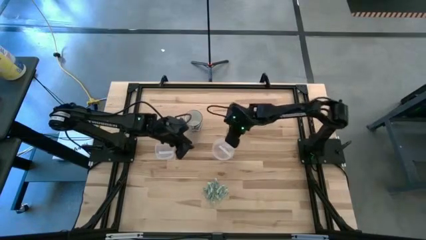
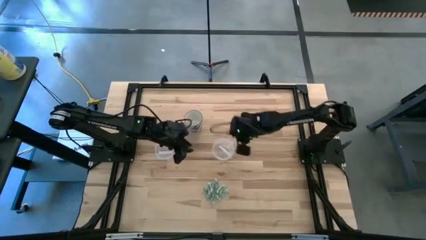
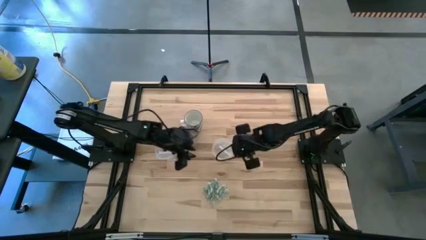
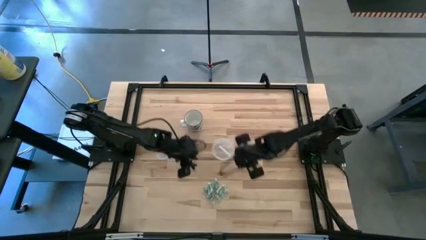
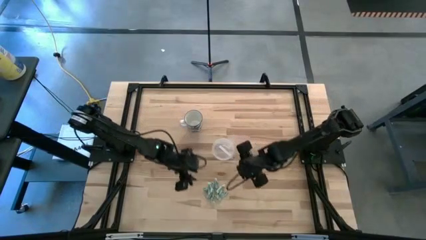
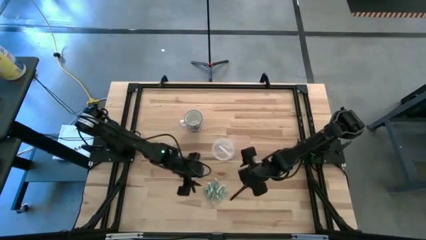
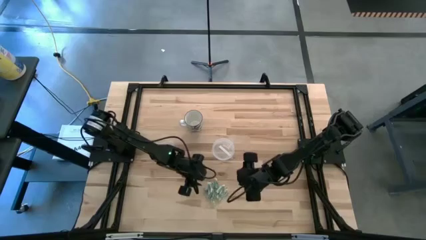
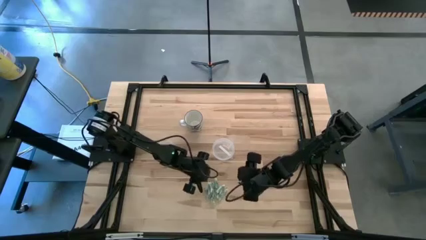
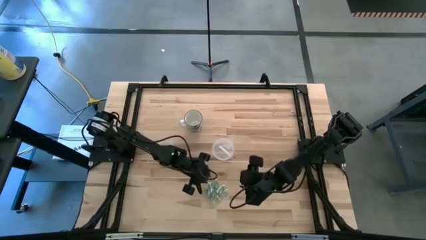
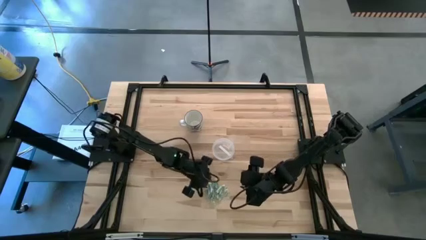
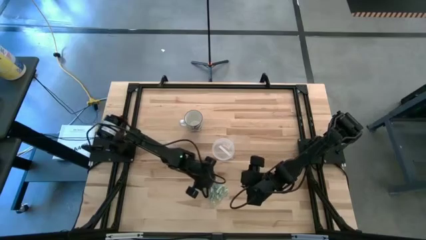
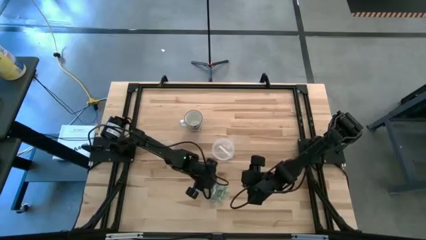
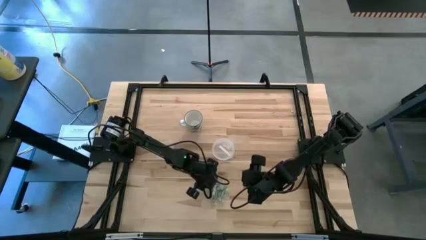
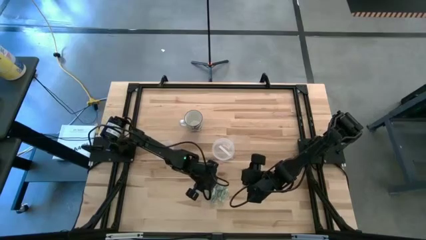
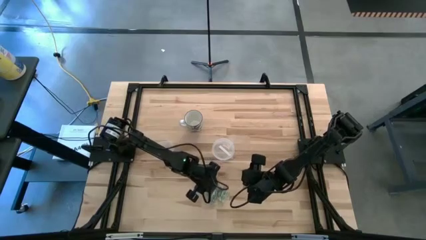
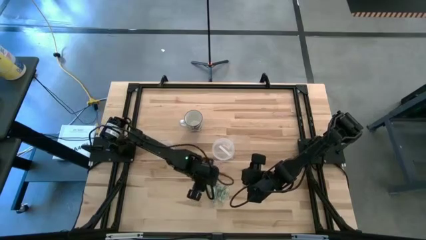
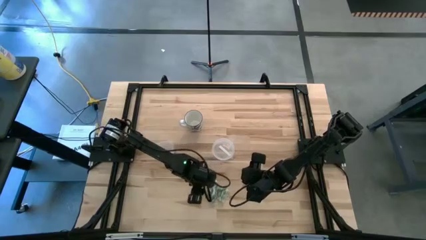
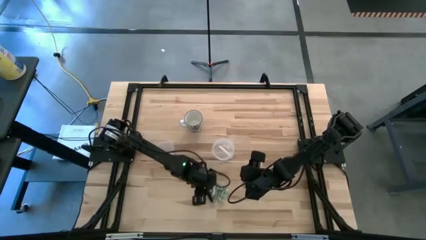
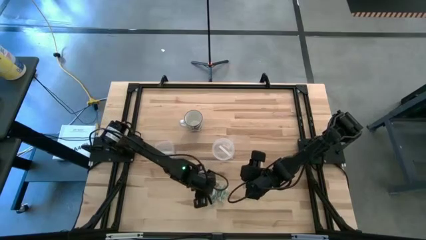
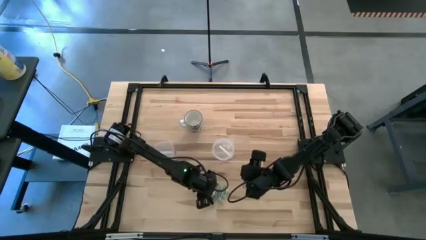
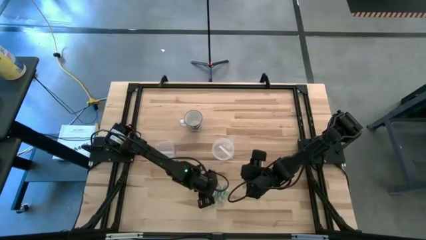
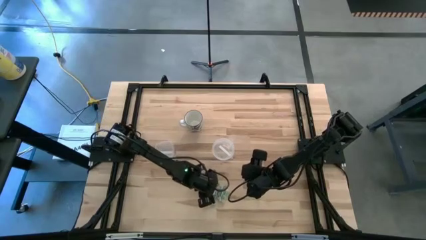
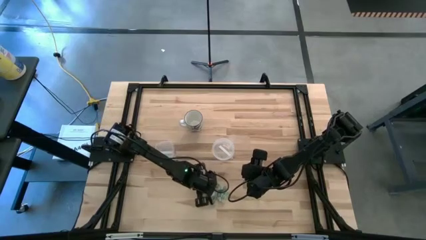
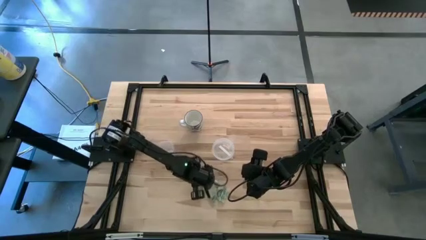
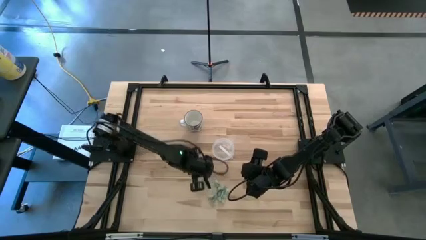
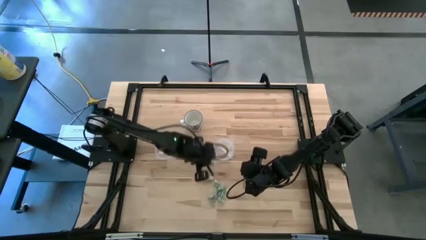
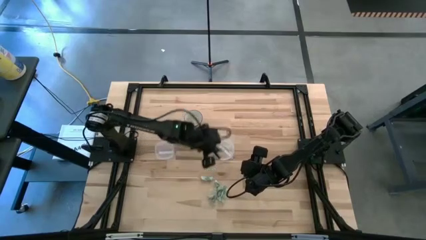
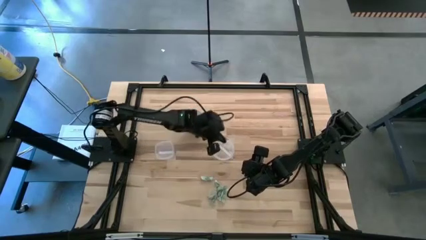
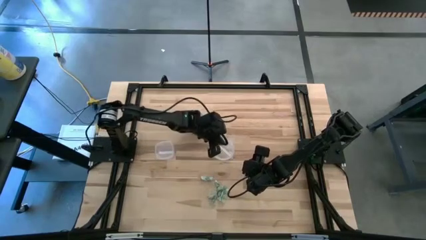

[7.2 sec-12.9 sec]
Task: Pick and place Stevia / Truvia into bins
Put the white stevia packet into the right transparent container

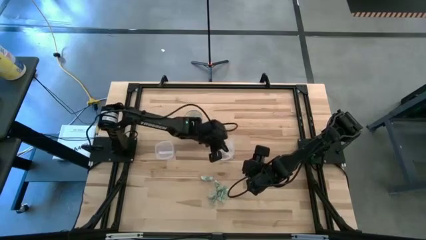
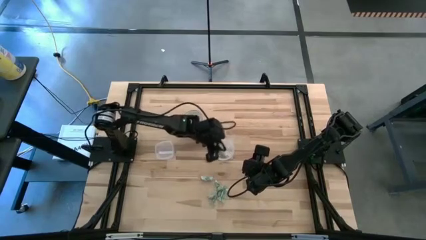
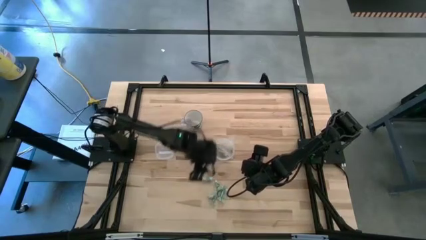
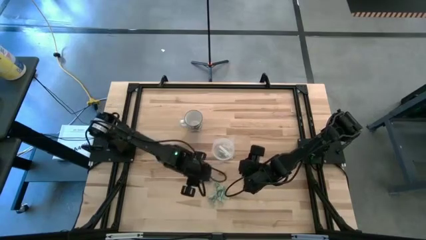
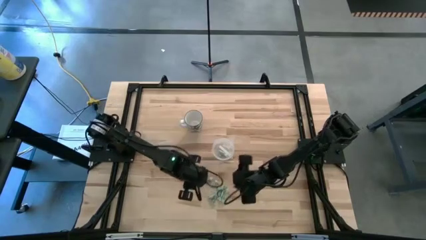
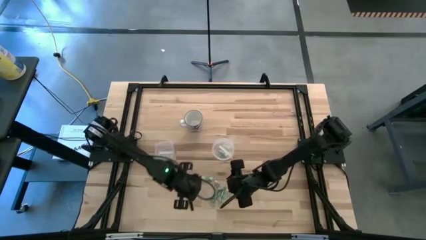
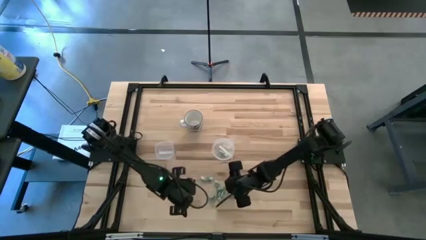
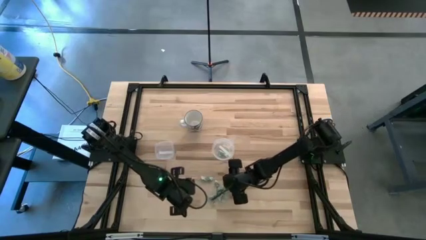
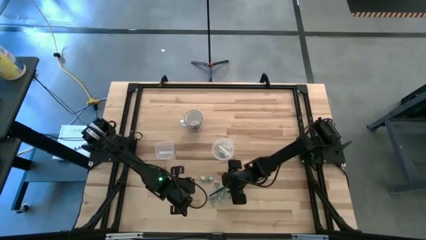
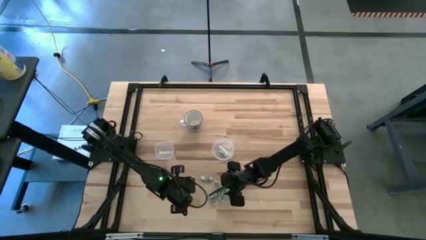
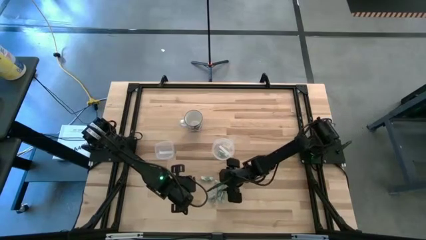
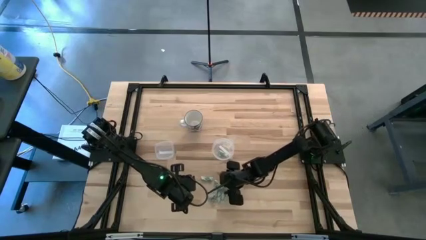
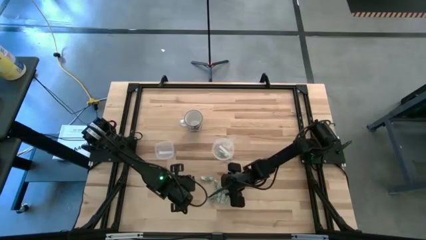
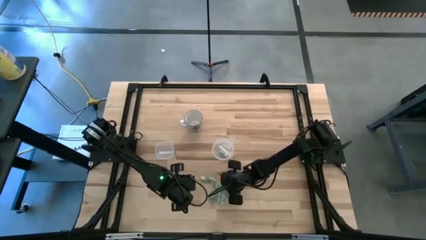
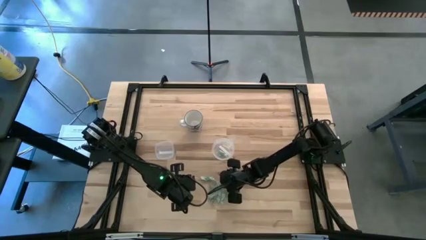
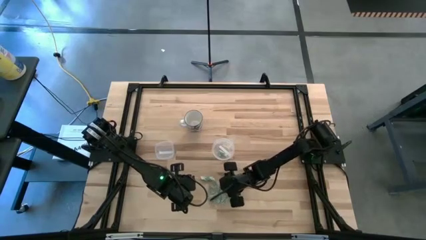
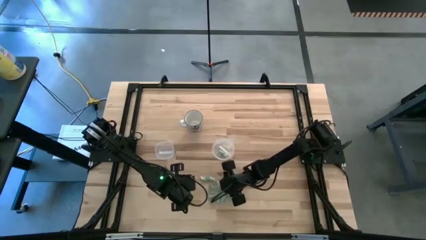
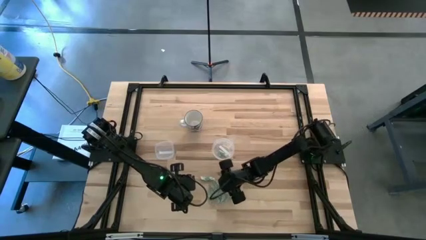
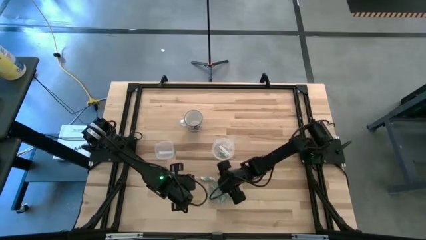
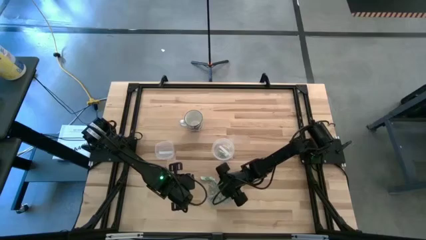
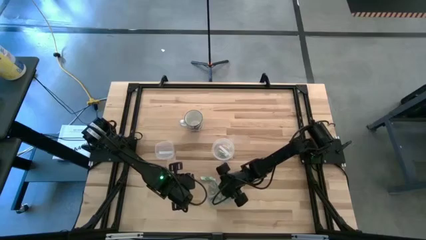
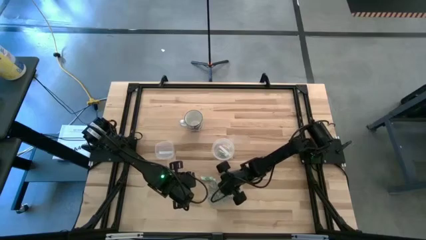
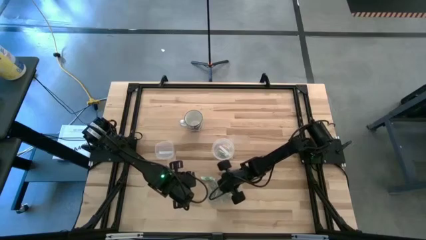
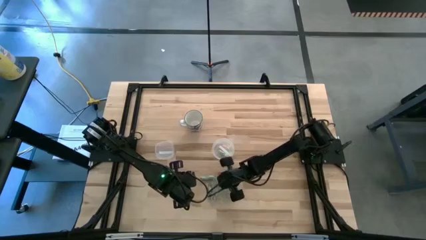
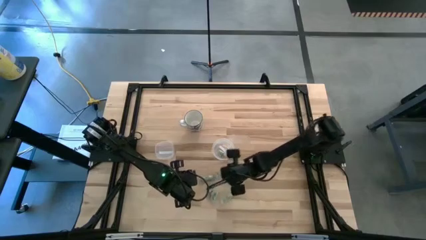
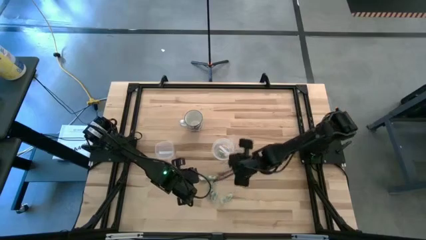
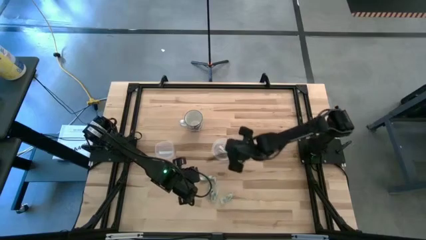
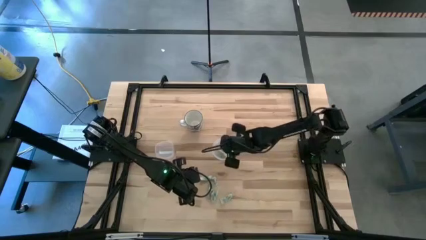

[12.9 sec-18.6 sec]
Put the white stevia packet into the right transparent container

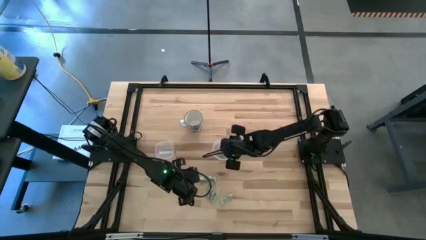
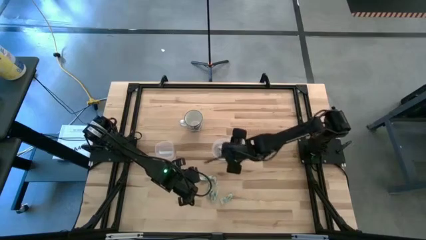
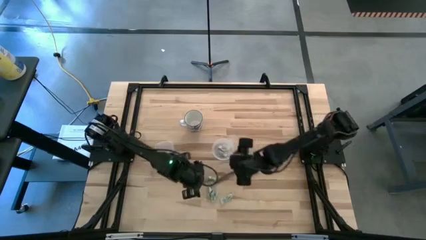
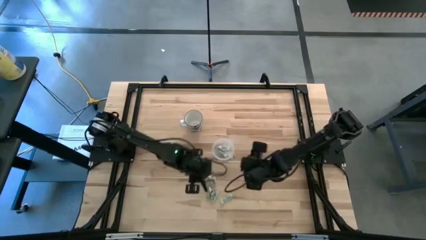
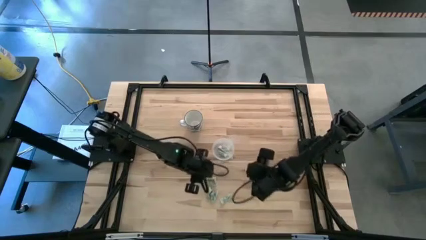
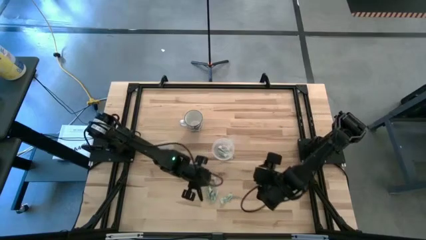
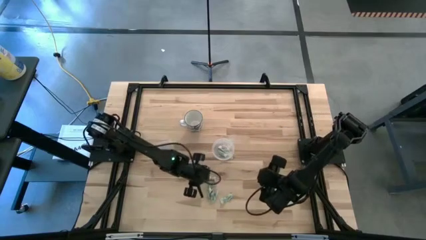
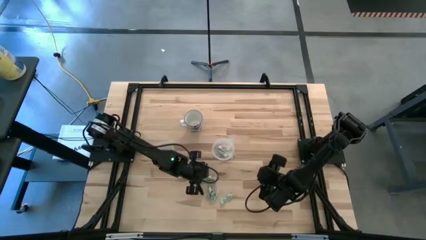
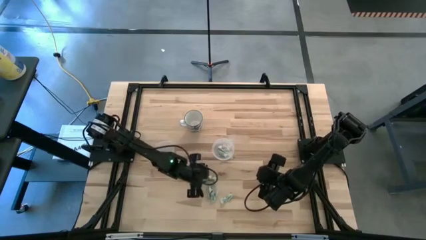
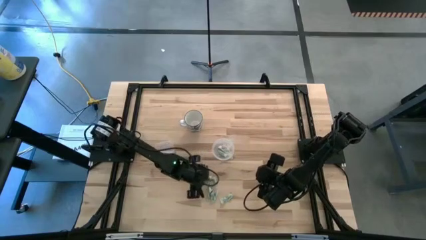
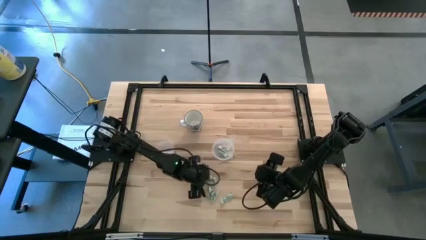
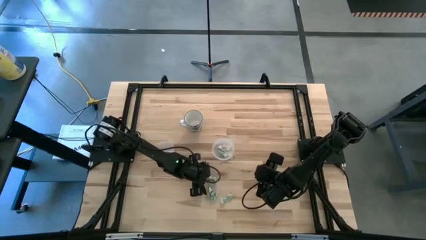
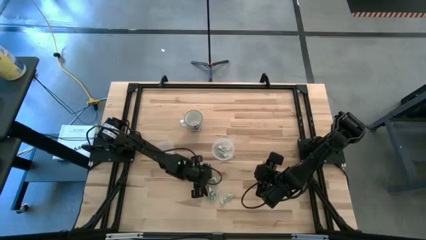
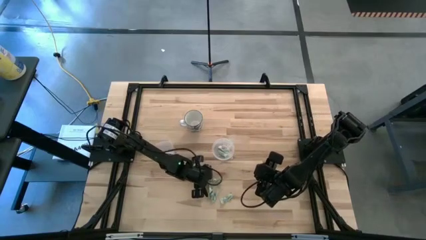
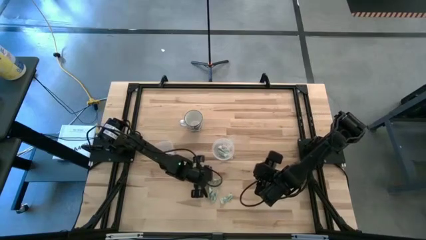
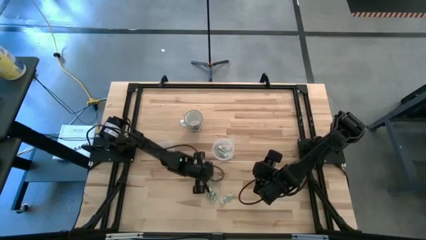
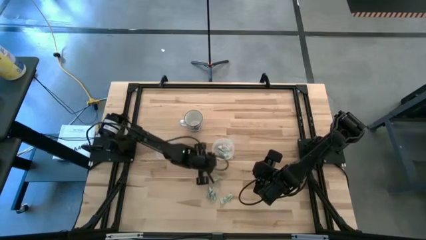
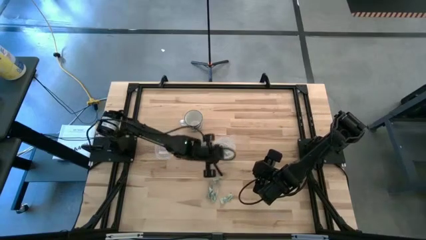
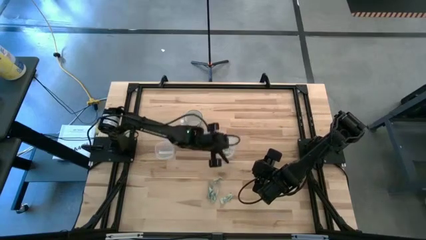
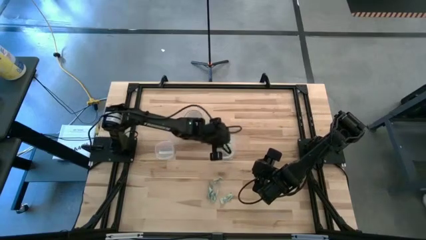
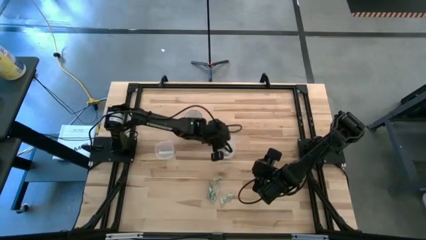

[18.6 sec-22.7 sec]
Put the white stevia packet into the right transparent container

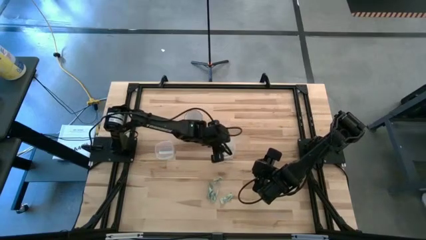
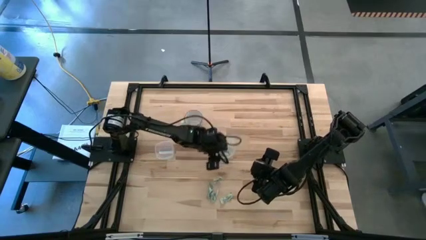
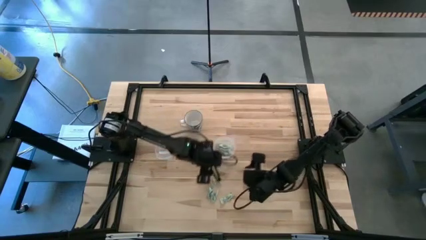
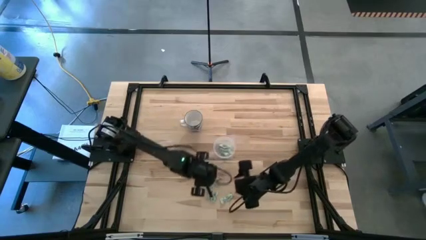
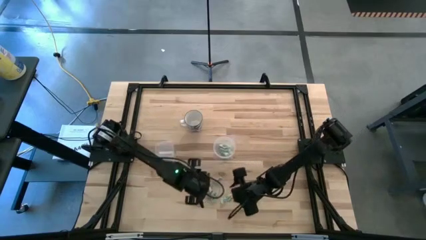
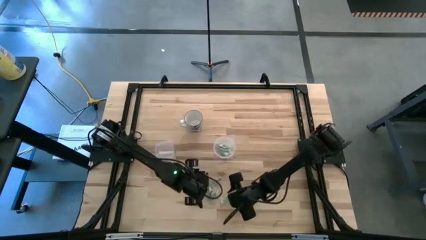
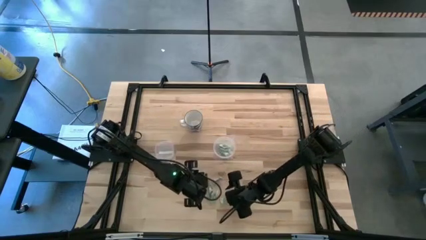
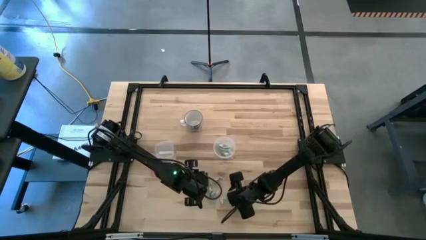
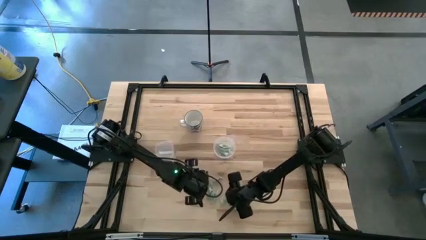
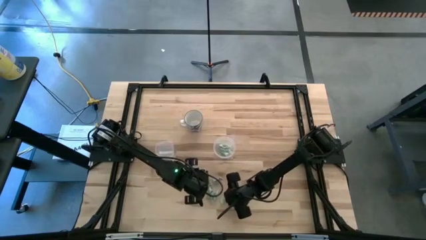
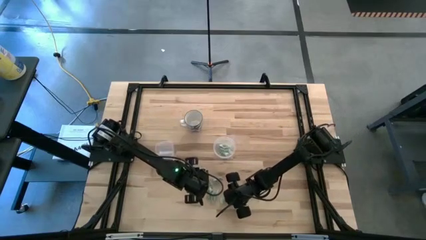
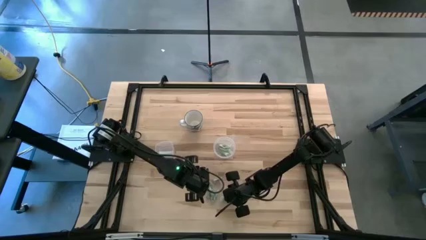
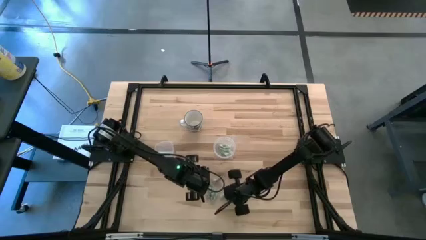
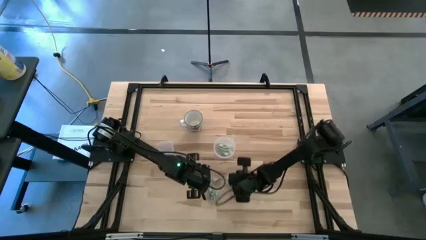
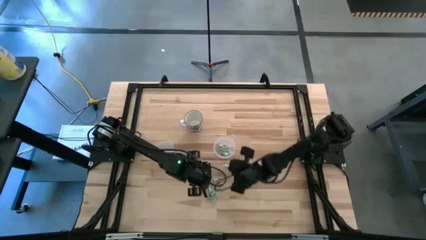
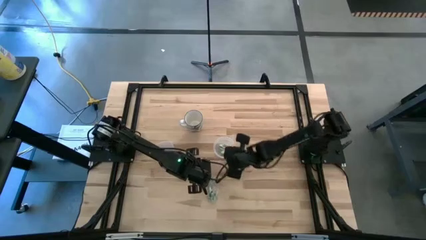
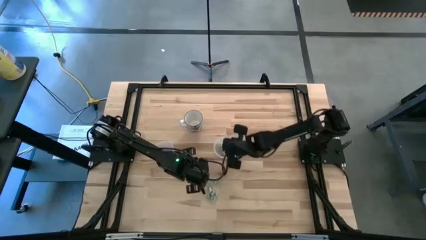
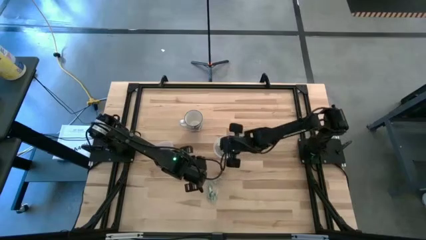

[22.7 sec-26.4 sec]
Put the white stevia packet into the right transparent container
